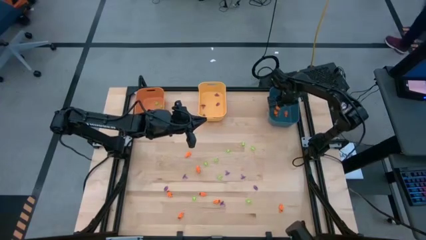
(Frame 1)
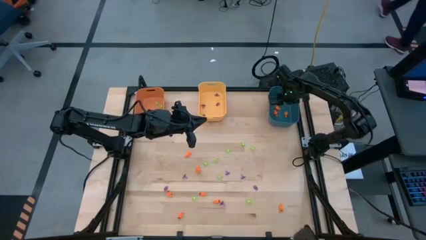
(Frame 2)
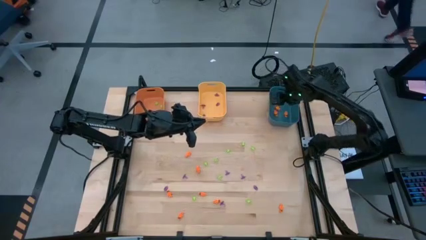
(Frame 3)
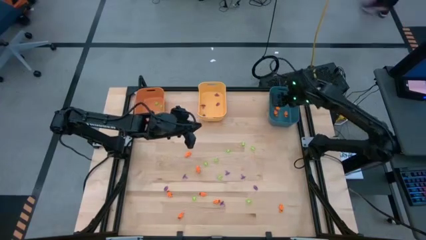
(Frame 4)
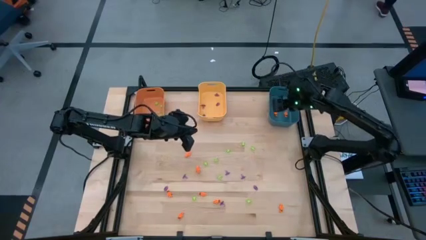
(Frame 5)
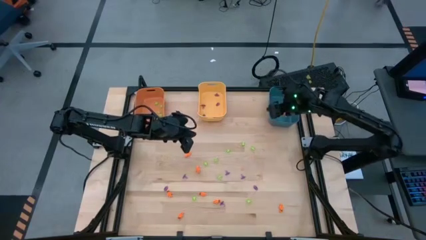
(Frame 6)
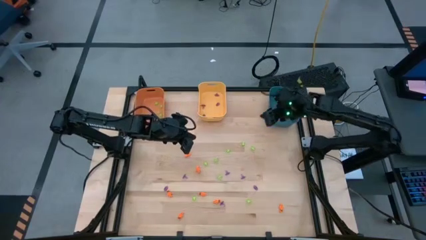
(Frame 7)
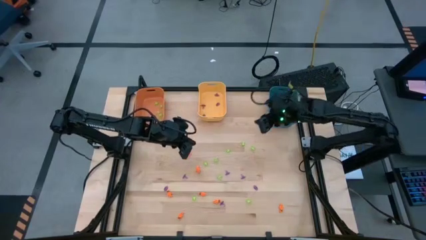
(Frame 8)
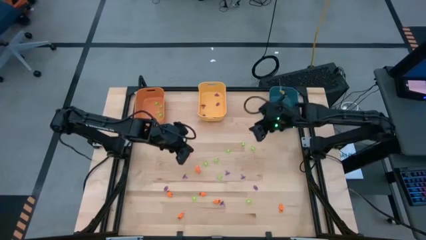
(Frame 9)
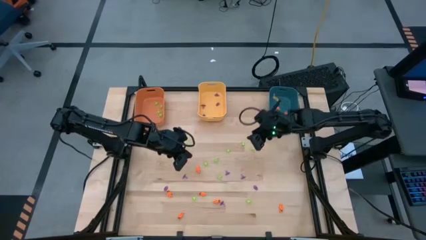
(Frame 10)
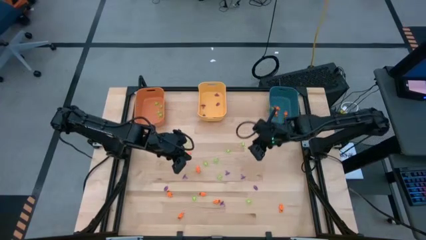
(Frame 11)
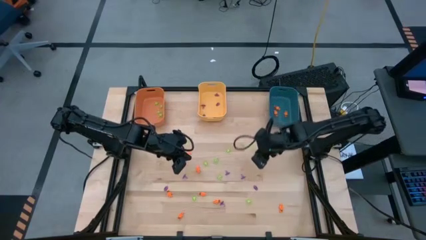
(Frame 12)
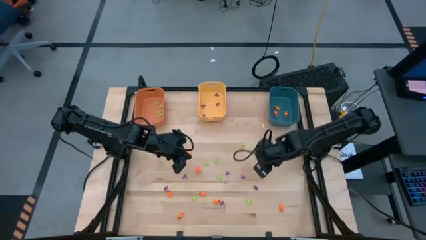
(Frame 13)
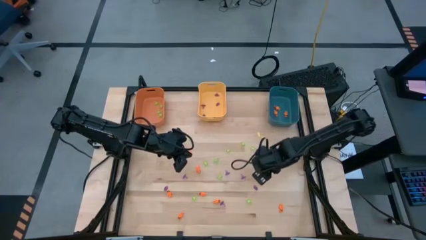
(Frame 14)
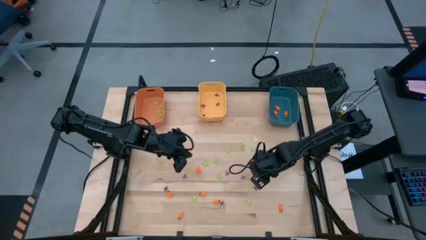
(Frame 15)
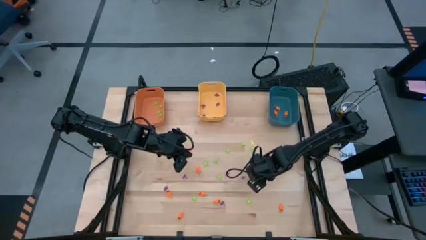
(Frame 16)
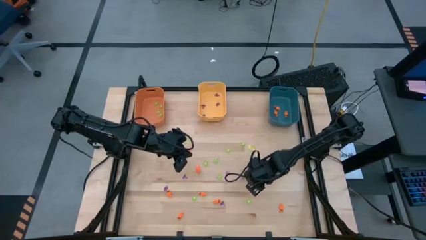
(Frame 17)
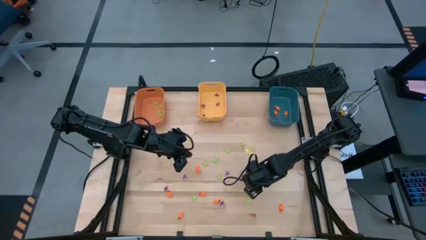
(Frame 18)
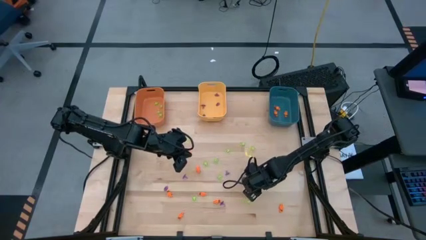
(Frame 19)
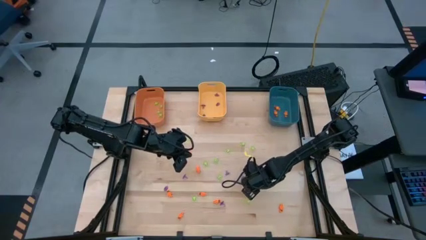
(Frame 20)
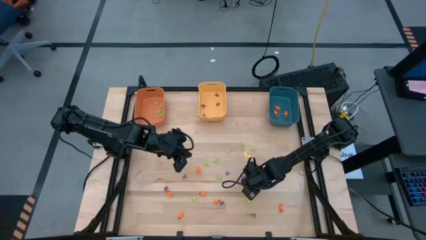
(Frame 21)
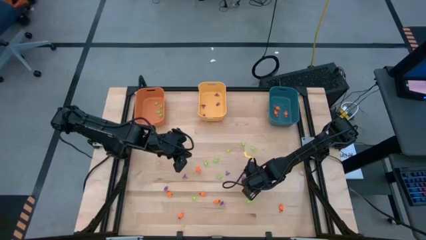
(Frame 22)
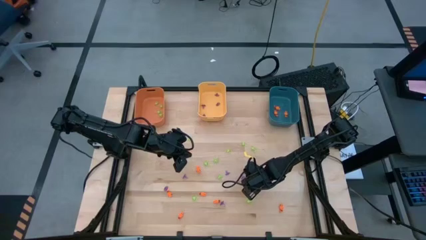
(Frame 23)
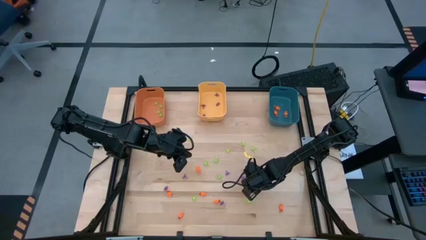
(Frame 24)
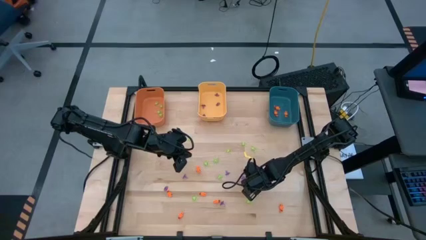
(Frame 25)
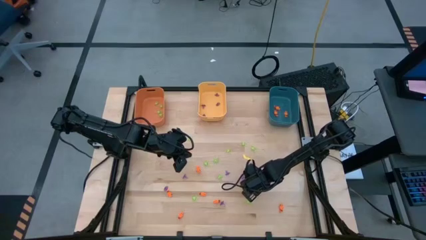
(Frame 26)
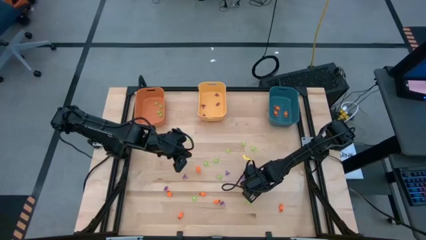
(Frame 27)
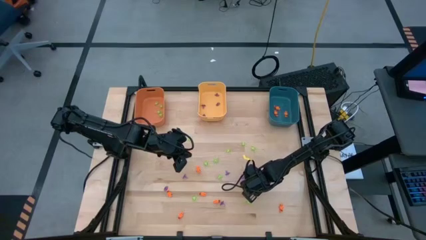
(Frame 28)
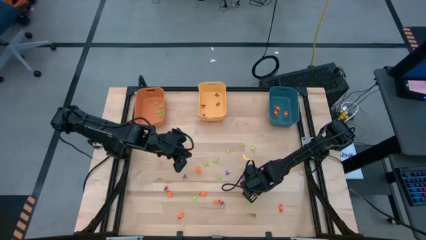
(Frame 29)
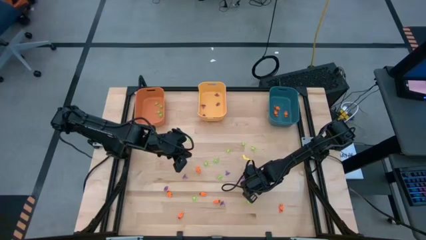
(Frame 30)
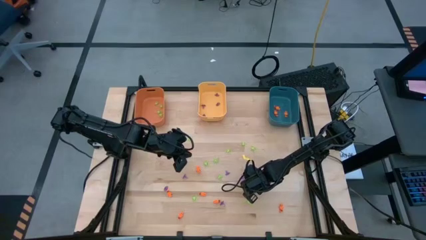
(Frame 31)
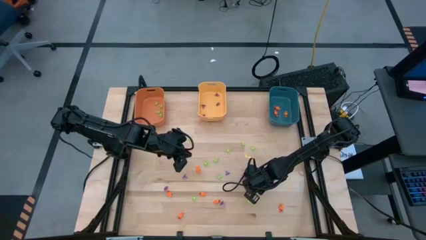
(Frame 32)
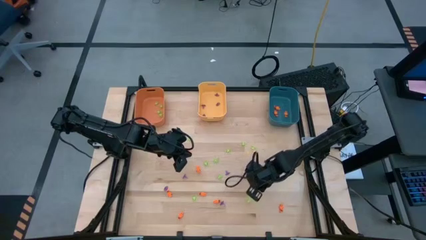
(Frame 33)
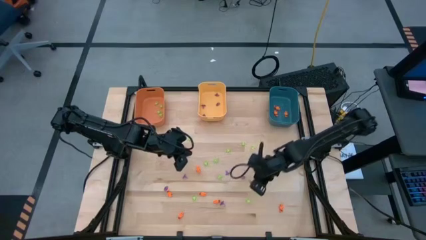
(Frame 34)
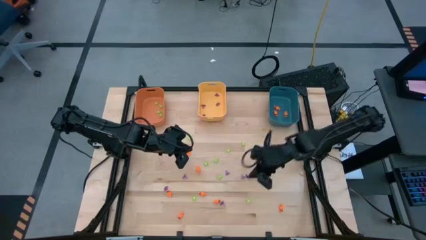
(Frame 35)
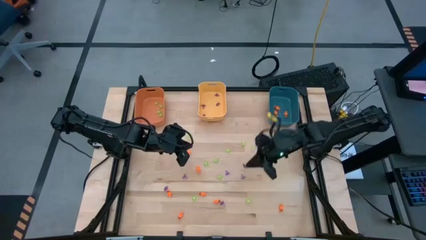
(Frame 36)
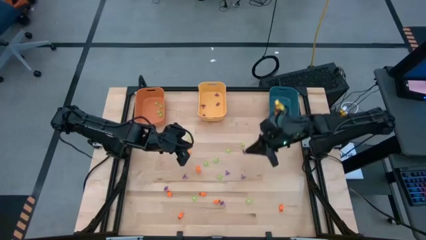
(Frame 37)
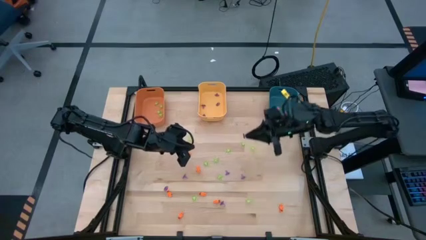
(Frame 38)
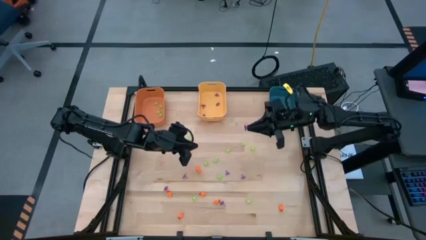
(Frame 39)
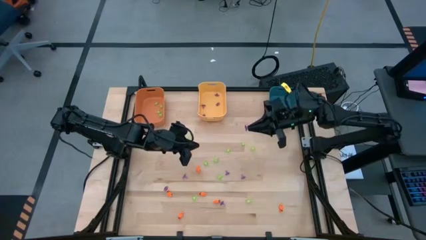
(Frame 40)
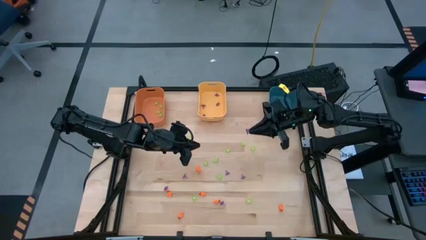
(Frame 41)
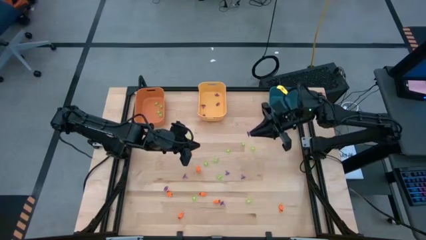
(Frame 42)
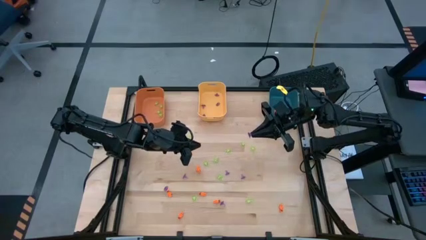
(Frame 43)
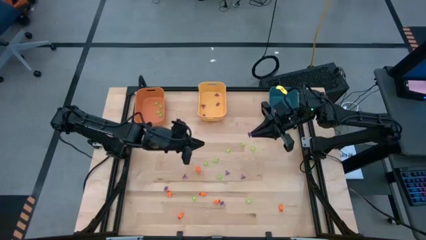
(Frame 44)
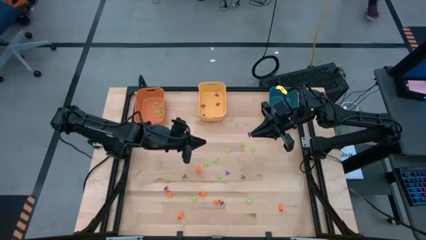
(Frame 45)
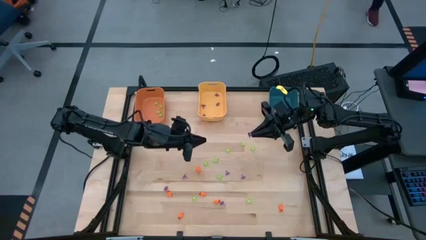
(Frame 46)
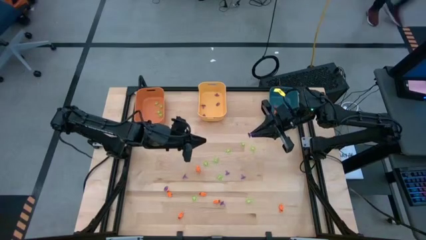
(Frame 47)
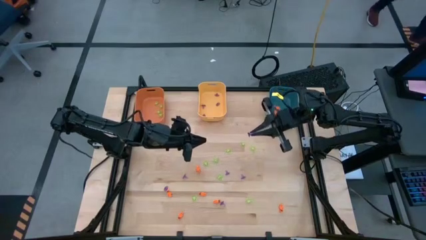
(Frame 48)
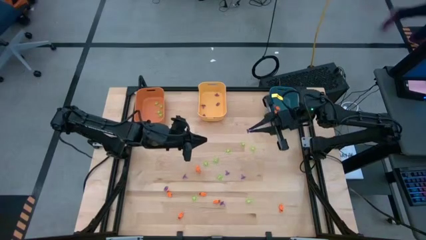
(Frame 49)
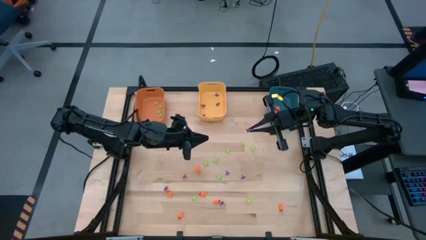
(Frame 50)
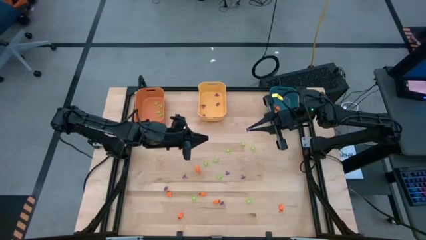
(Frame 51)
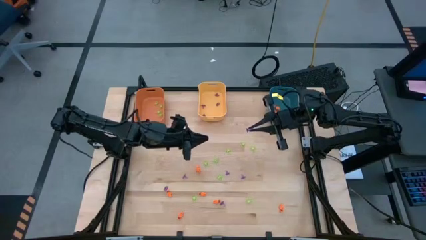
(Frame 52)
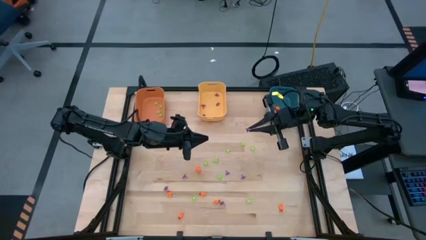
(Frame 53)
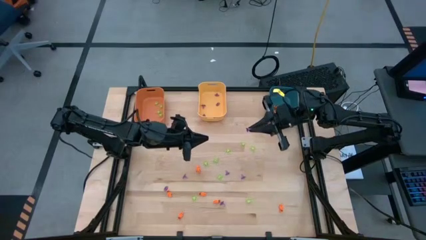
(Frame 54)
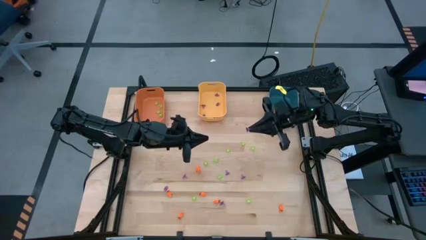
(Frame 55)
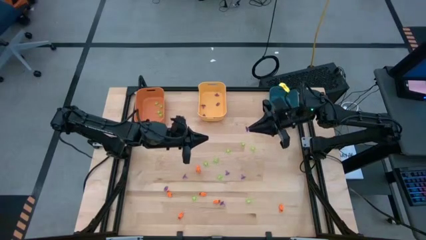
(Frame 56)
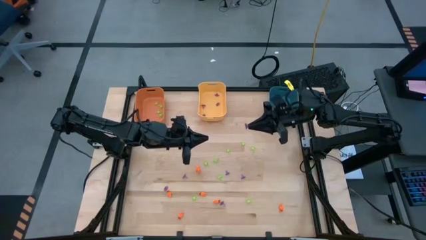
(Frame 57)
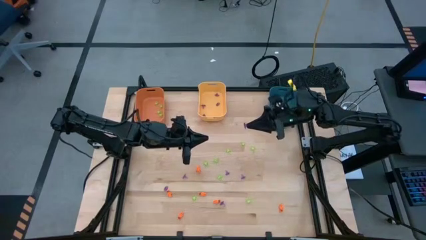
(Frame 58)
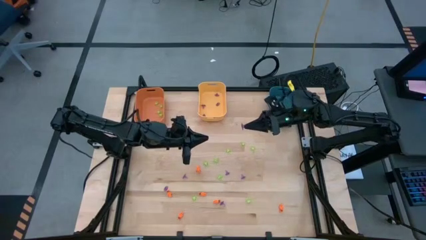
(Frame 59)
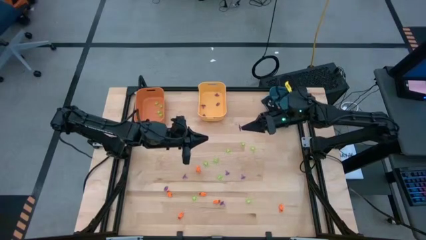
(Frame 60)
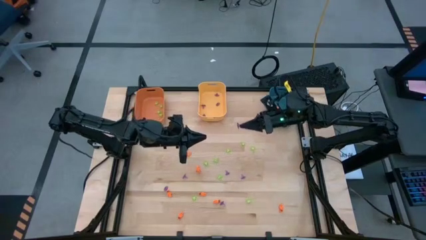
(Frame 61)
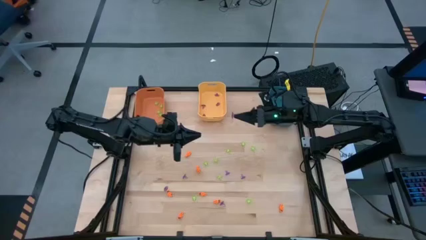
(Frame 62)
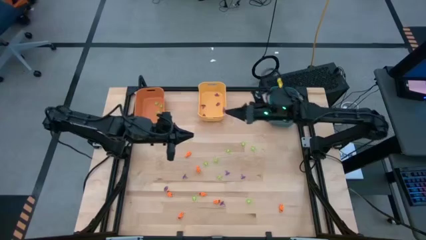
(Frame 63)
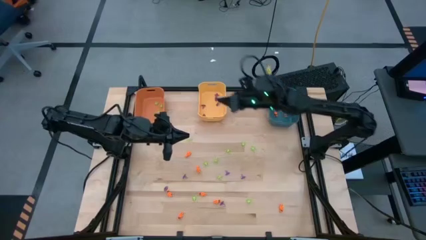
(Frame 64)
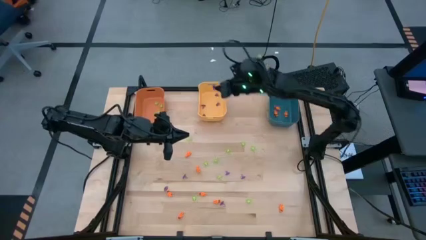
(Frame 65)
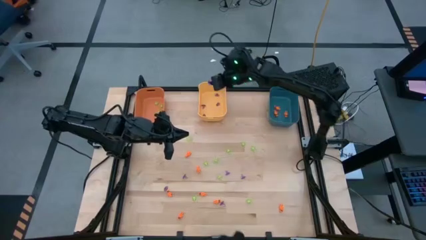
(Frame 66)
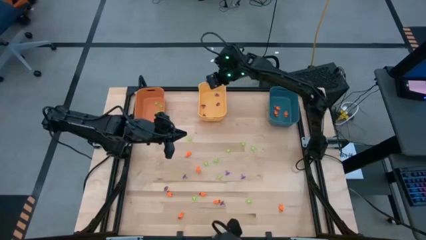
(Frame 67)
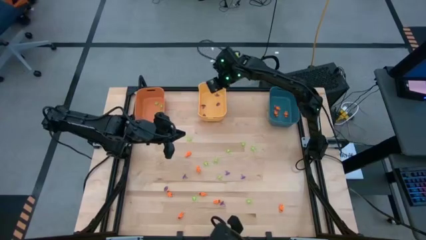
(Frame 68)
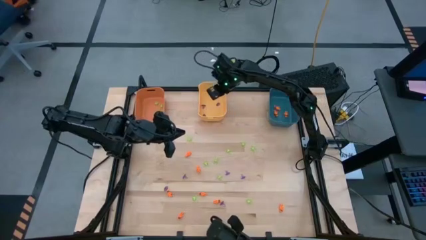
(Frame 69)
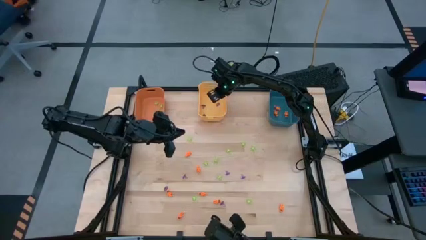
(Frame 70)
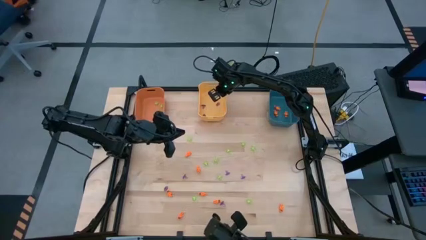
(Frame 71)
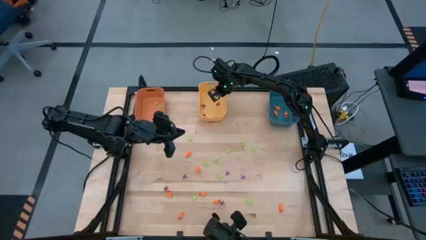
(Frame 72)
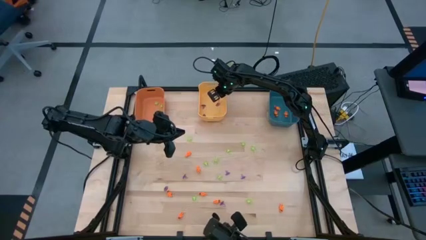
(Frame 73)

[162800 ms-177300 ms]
Task: Sort Halloween decoration
Put the purple witch hat toy into the yellow bin

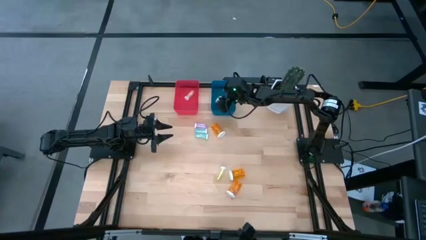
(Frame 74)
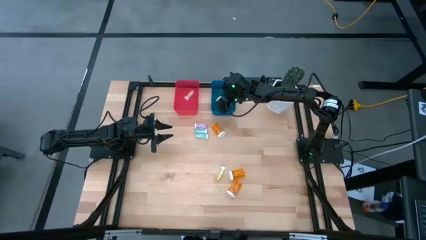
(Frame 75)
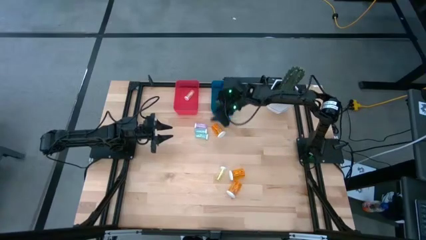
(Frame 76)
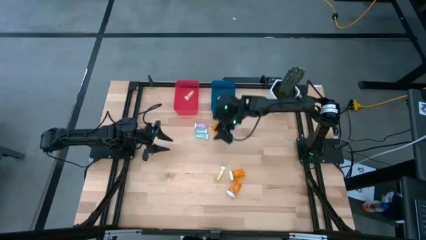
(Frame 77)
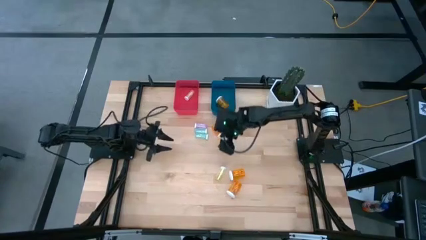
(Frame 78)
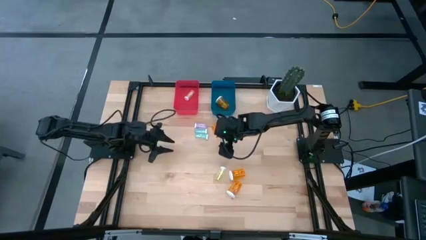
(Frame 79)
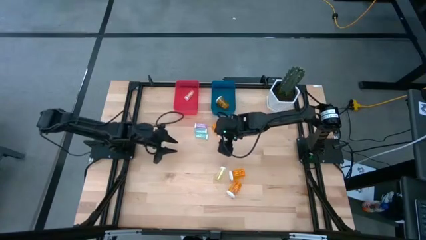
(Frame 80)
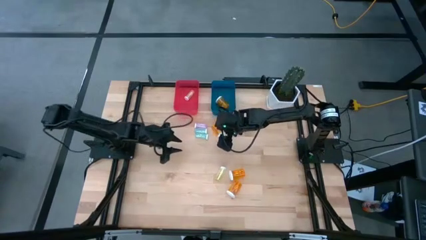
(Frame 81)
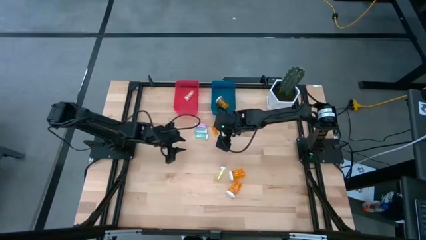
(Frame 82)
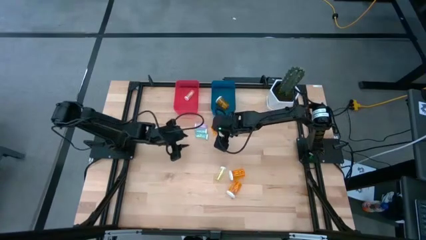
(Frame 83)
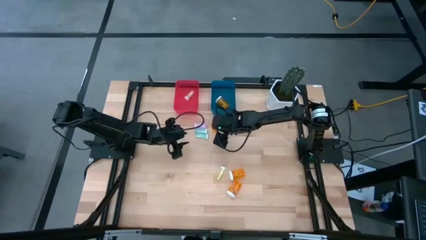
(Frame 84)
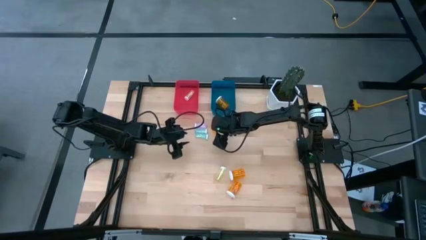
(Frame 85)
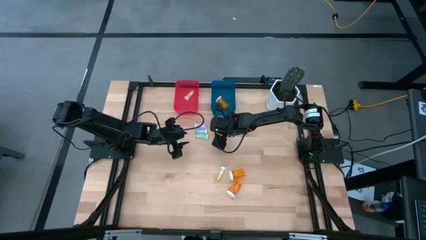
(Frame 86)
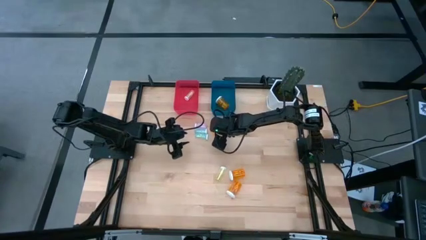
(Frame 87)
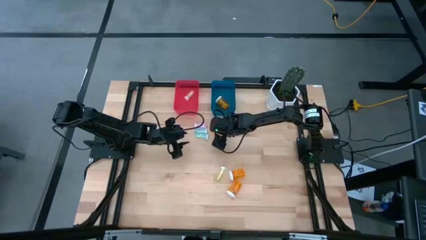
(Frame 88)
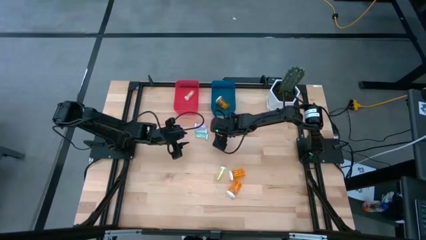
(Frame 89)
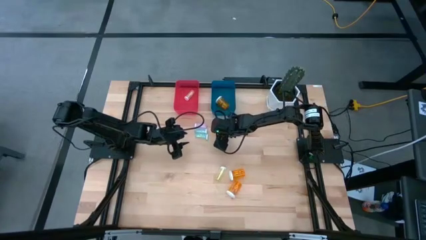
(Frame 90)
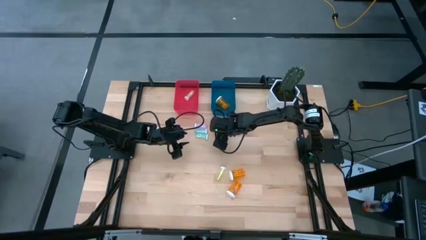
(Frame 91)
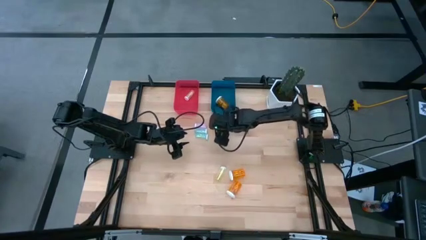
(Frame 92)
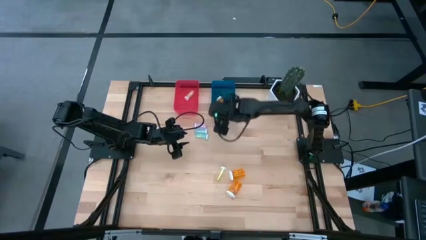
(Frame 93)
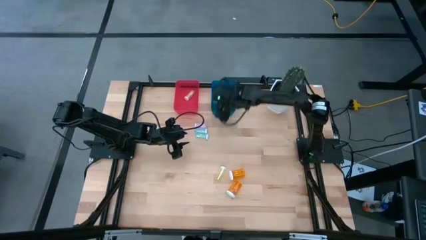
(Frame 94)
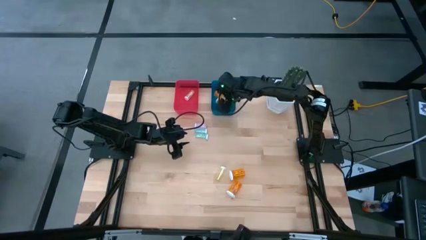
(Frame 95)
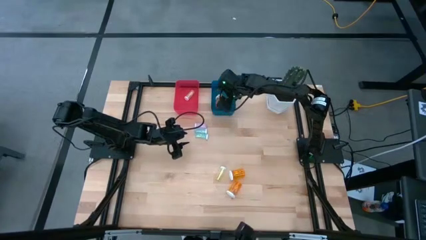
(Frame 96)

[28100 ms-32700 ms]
Task: Pick and place medicine bottles into bin by pill shape (circle, oval)
Put the orange capsule bottle into the blue bin
